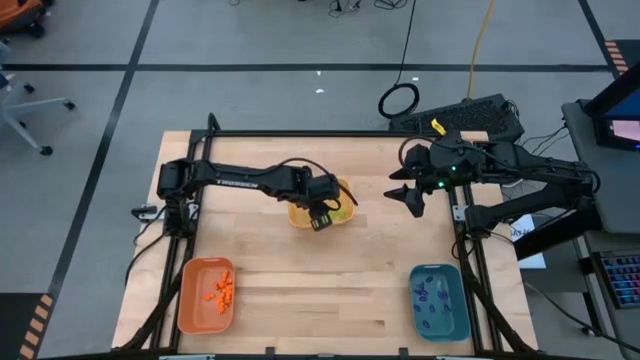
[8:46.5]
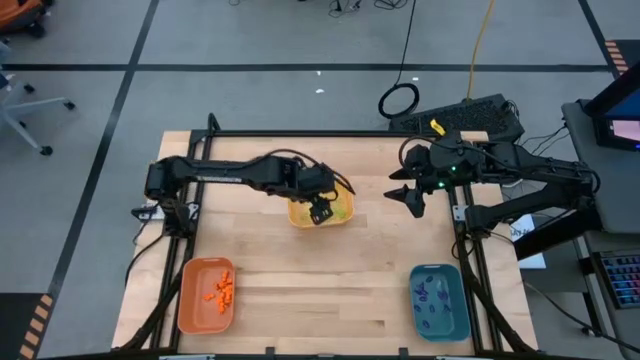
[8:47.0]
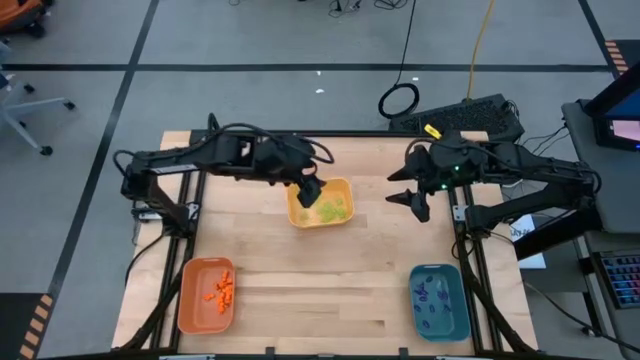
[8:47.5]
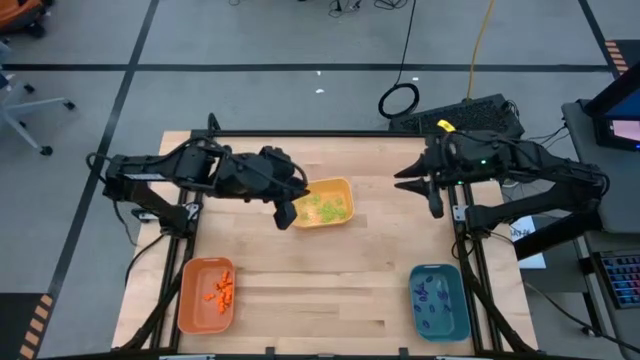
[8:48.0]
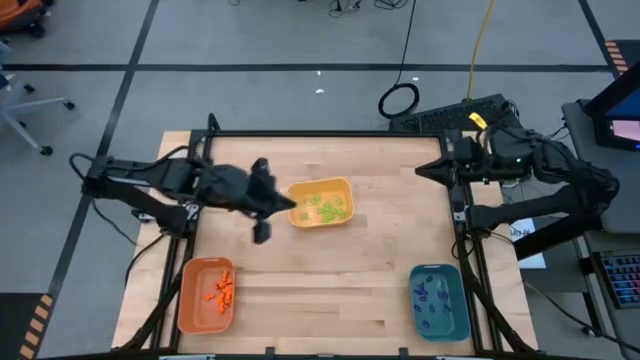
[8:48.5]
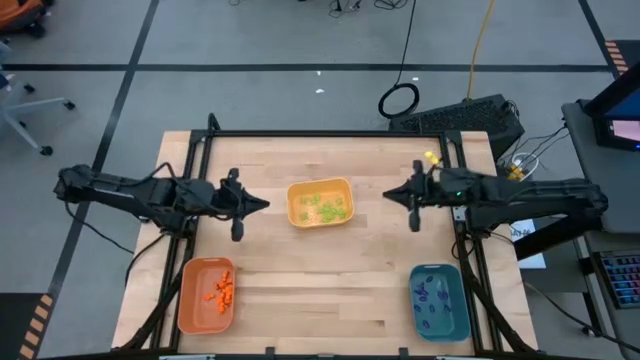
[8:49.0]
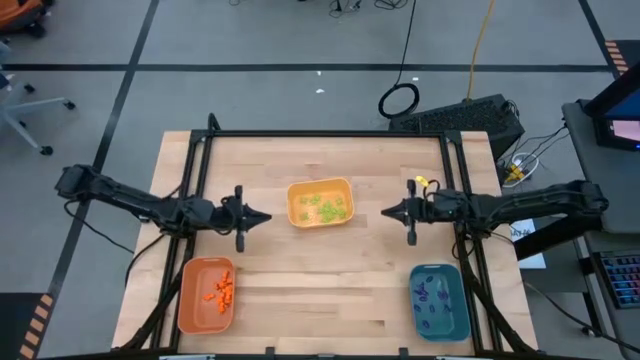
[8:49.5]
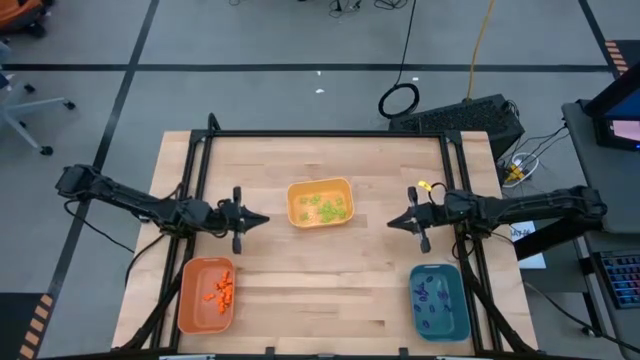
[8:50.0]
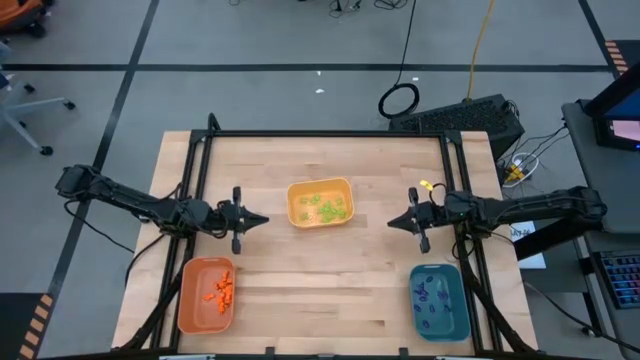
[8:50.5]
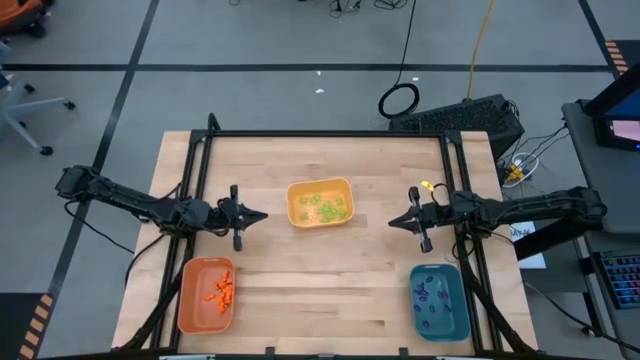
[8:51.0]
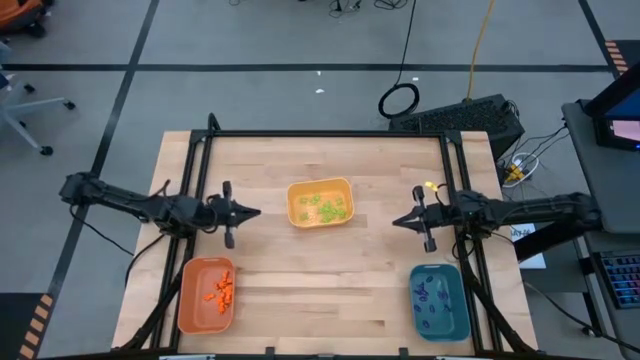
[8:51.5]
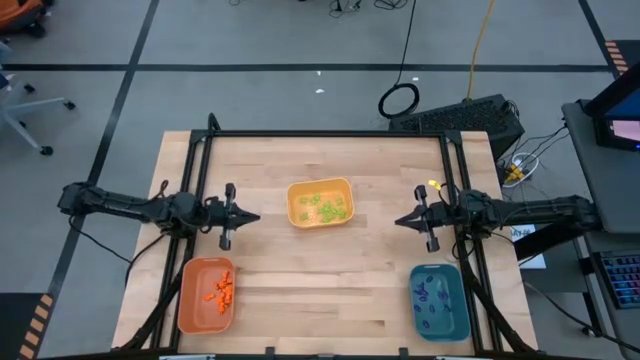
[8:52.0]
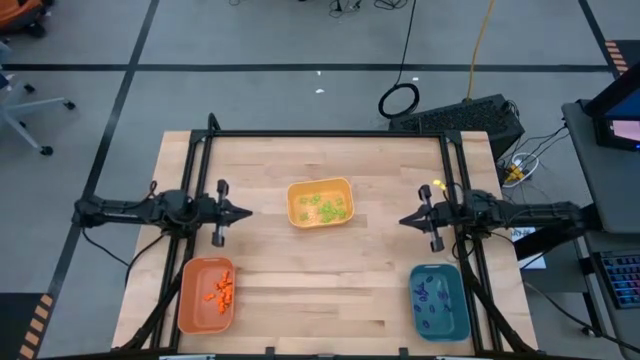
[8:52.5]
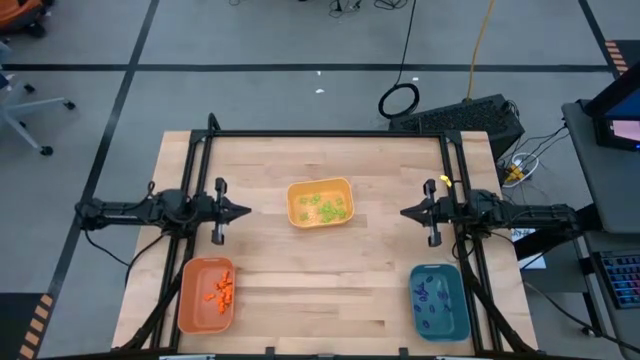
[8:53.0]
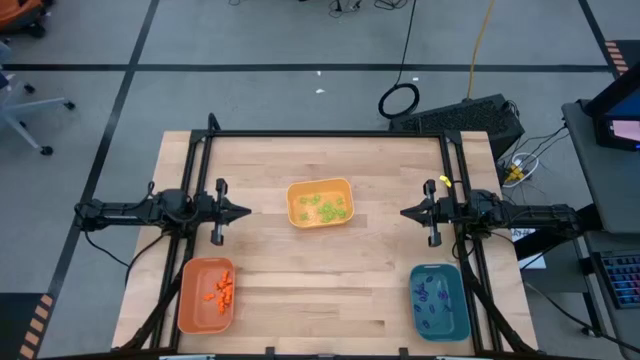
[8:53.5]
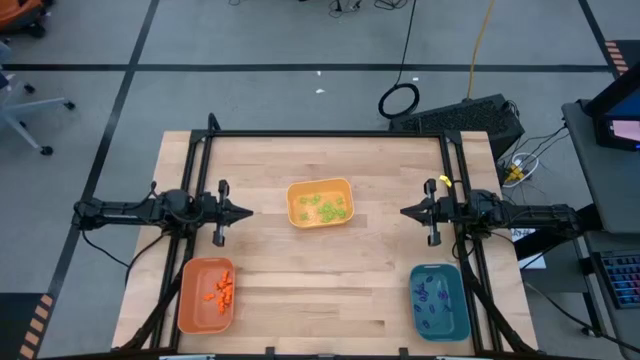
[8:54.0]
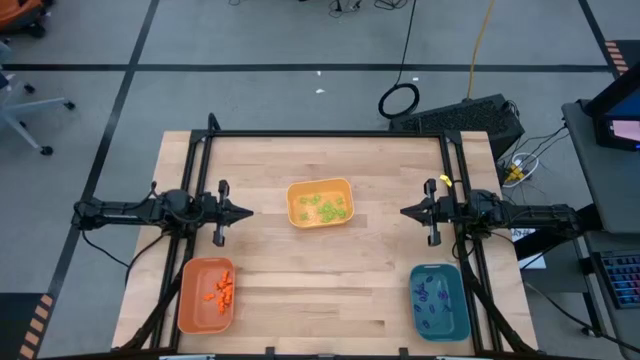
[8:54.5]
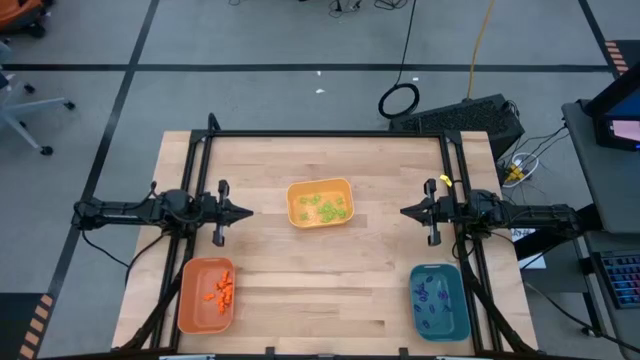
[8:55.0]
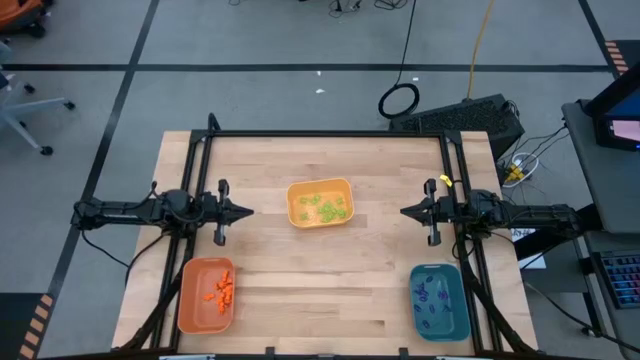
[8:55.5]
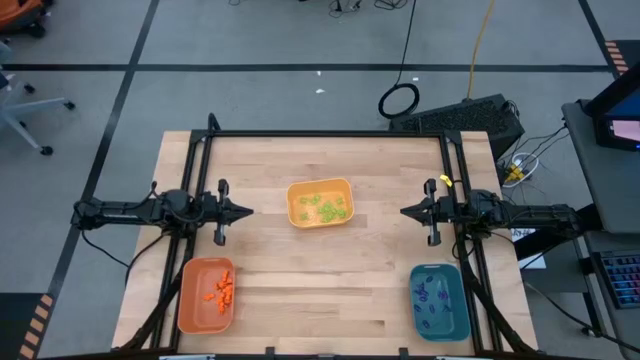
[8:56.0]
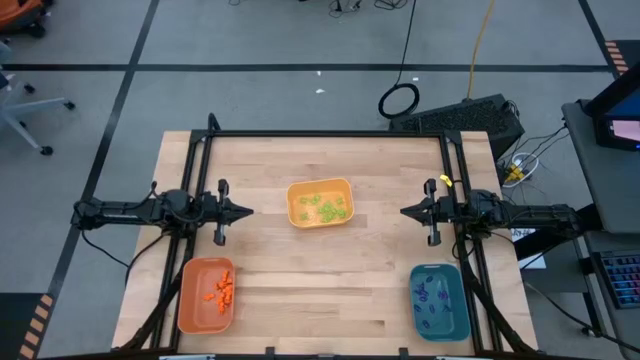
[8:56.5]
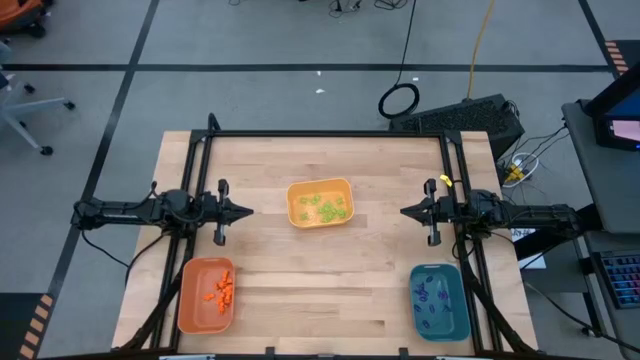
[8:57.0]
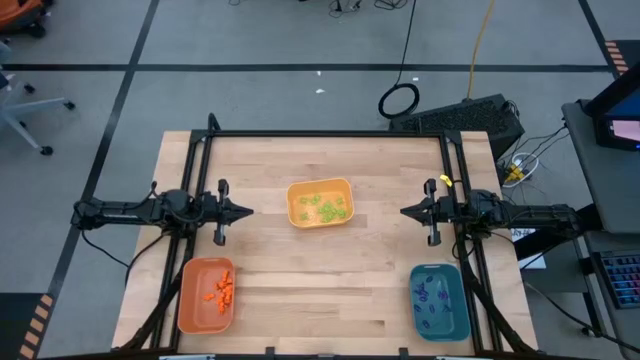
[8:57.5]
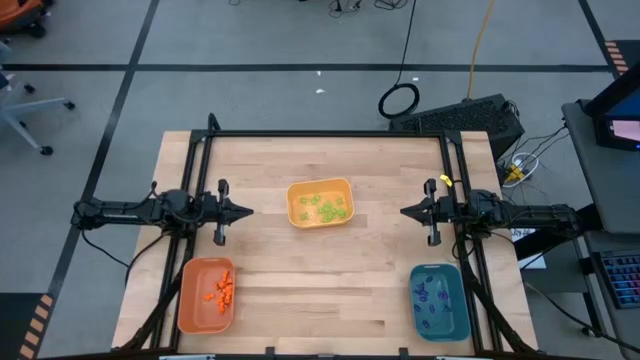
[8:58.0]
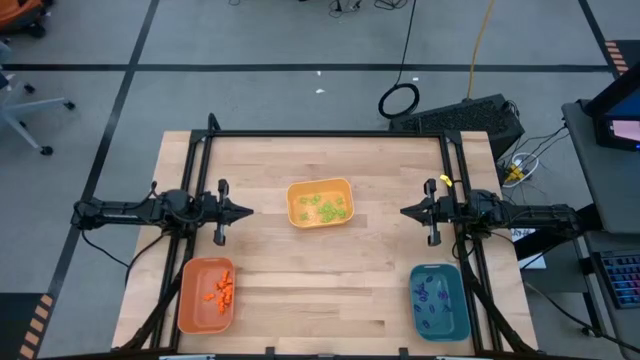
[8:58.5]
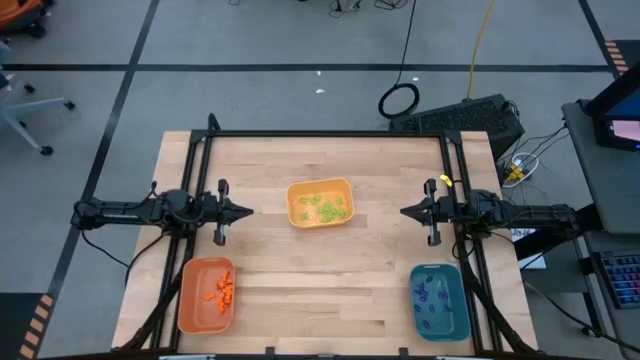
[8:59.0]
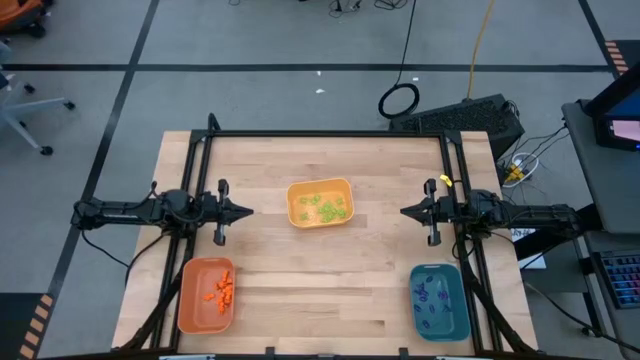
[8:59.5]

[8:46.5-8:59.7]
Task: Sort Halloween decoration
Return to Home Position

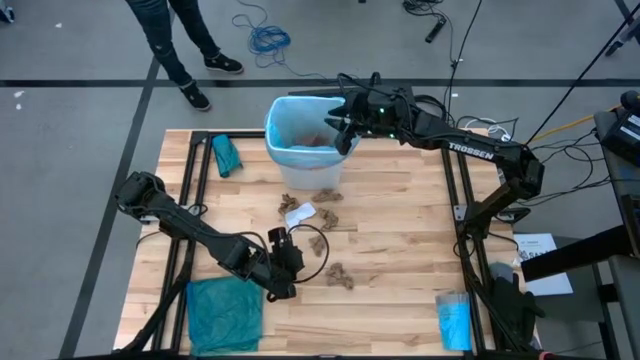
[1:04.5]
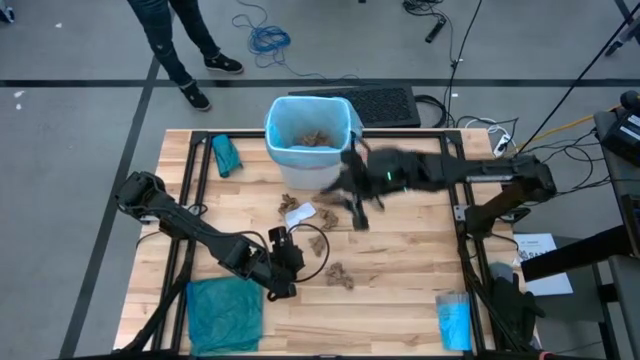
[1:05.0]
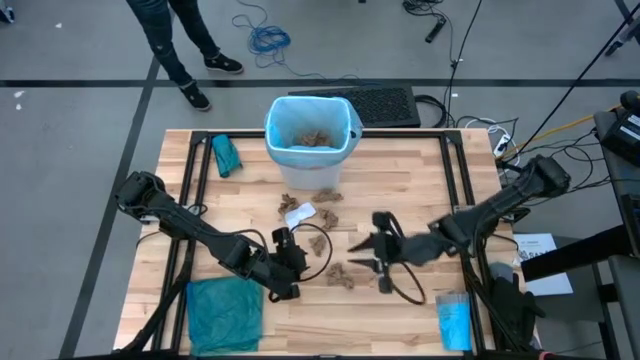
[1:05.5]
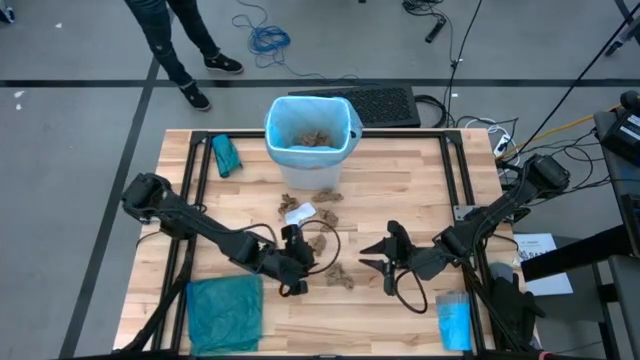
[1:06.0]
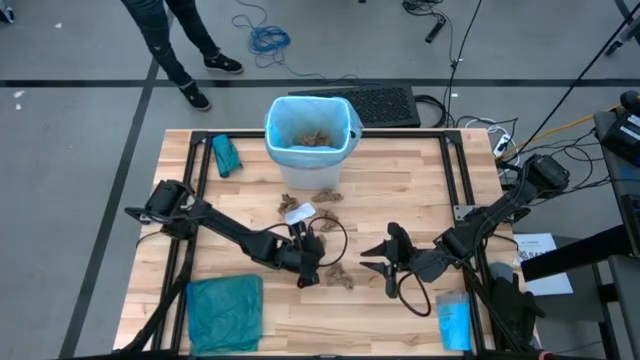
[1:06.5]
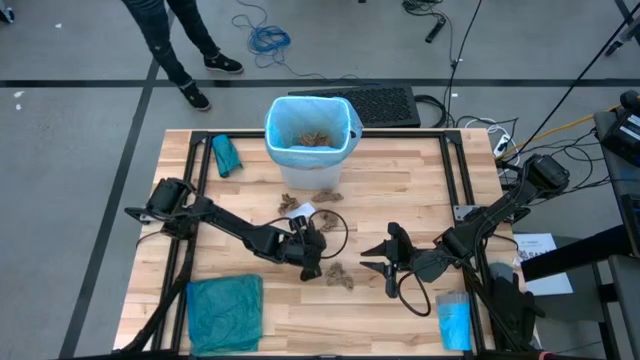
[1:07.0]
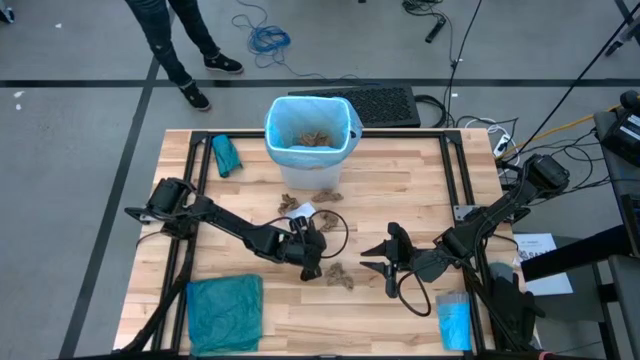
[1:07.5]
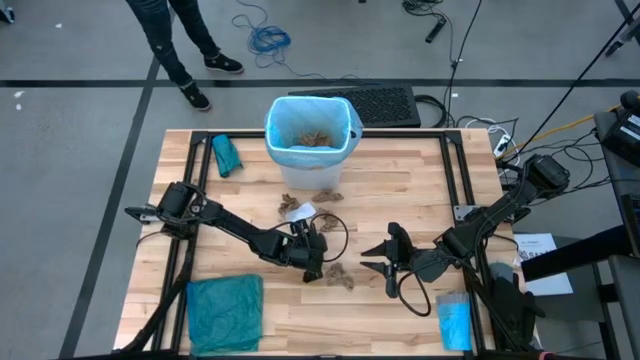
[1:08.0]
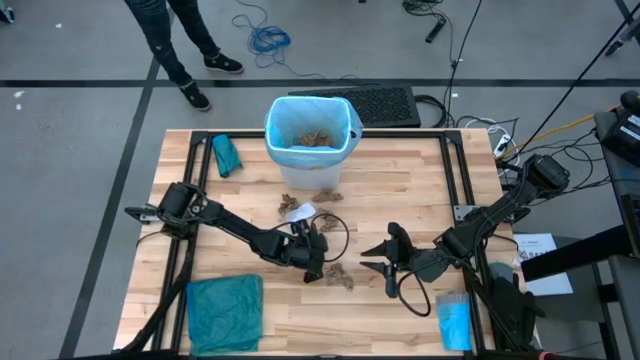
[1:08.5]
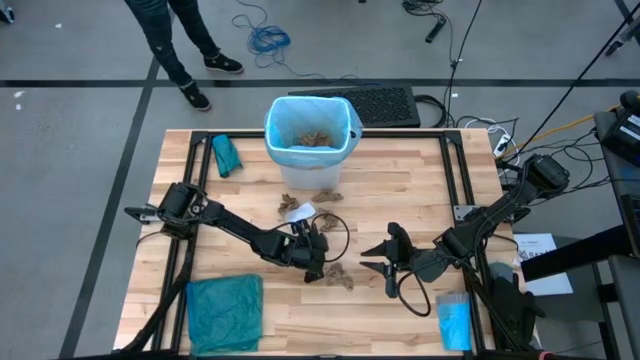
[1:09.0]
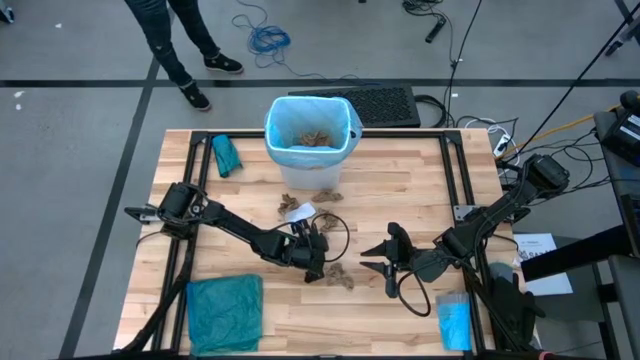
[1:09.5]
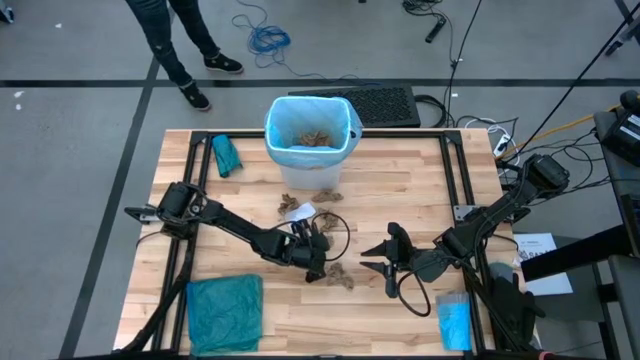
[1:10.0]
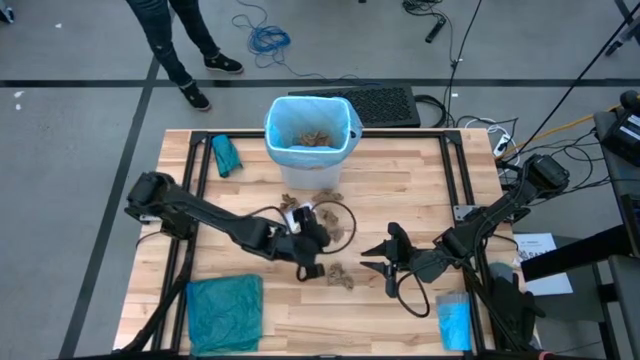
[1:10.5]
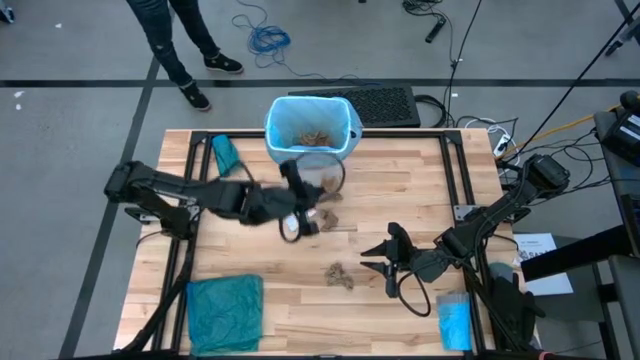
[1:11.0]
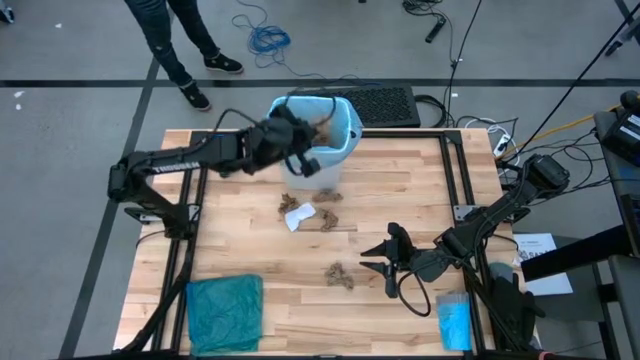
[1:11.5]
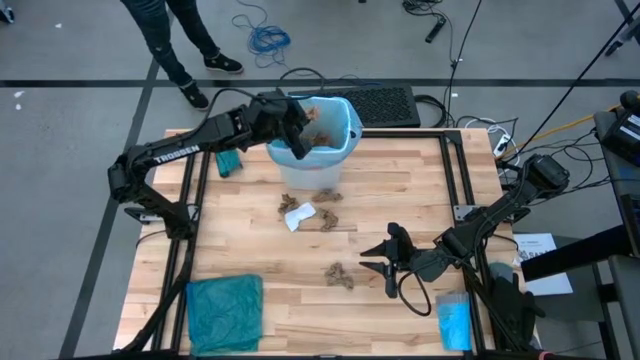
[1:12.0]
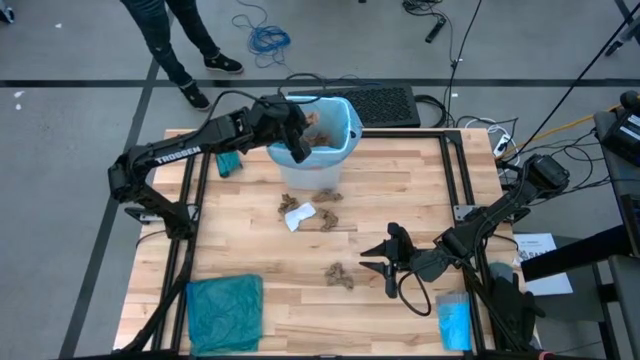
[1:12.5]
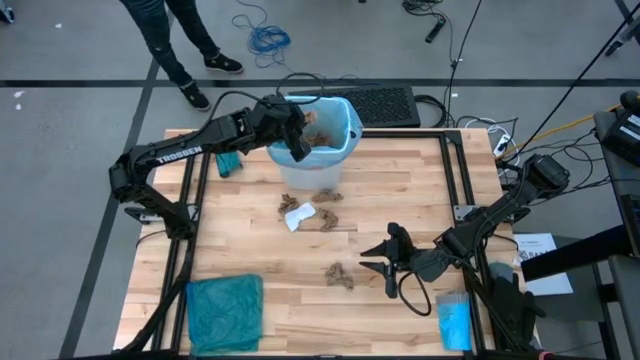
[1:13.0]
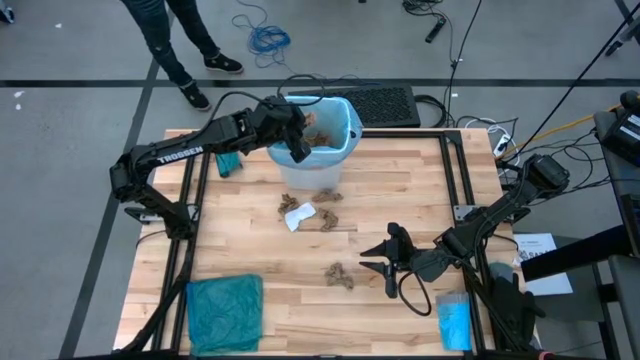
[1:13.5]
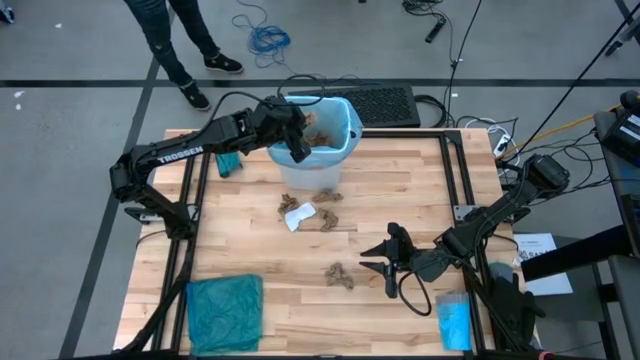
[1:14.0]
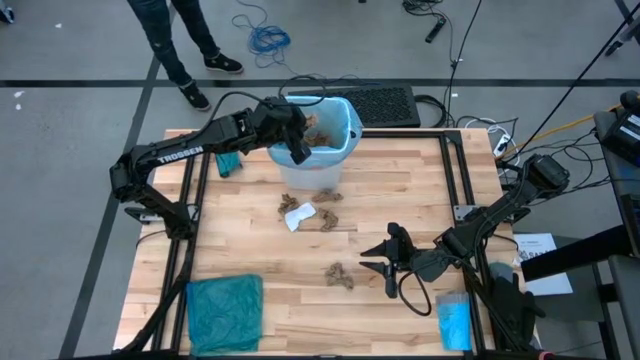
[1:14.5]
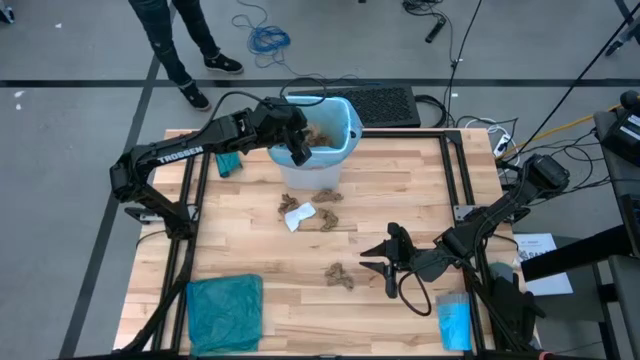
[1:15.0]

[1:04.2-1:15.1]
Task: place trash/remove bag and relplace
Put the brown paper into the blue trash bag inside the white trash bin
